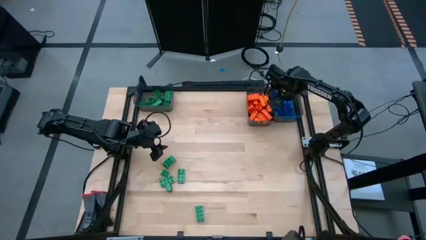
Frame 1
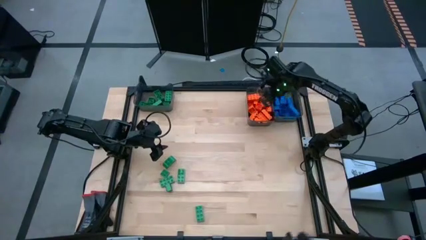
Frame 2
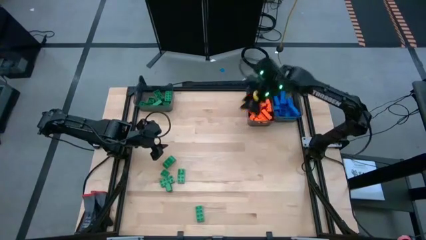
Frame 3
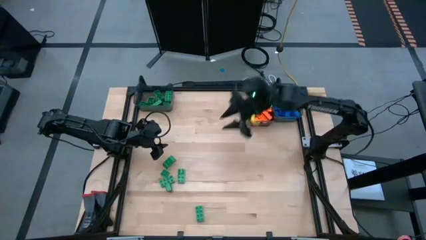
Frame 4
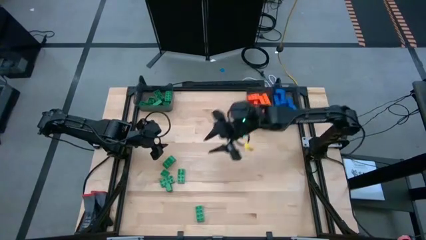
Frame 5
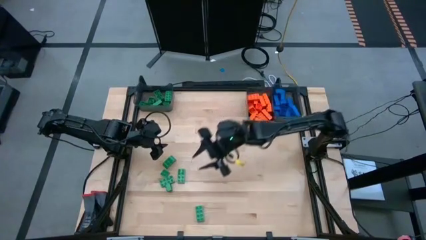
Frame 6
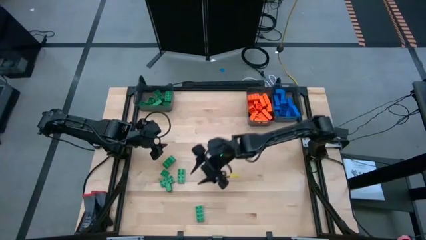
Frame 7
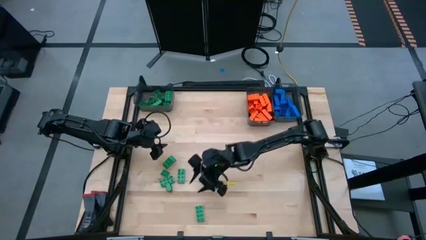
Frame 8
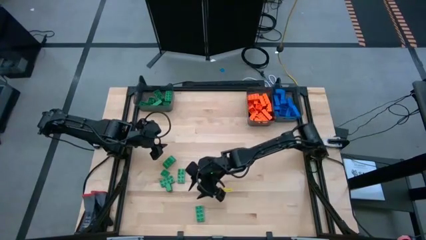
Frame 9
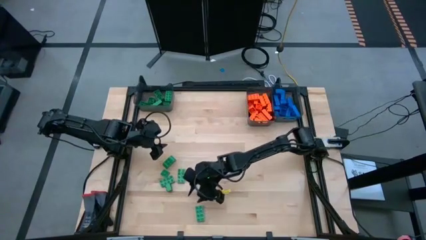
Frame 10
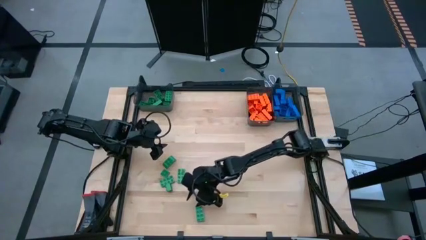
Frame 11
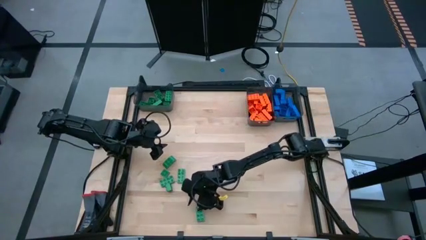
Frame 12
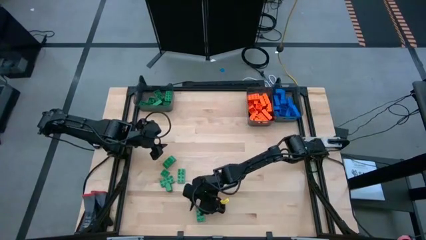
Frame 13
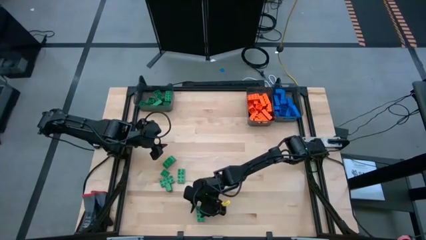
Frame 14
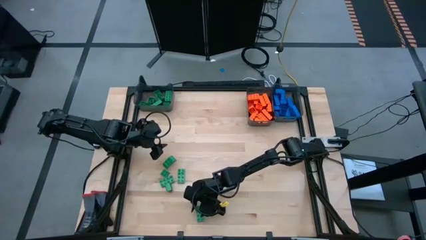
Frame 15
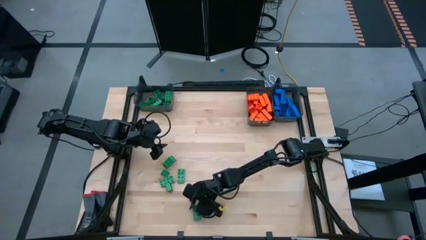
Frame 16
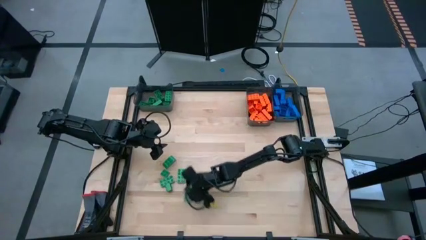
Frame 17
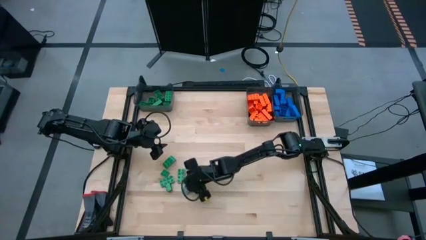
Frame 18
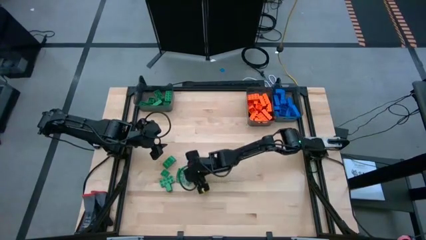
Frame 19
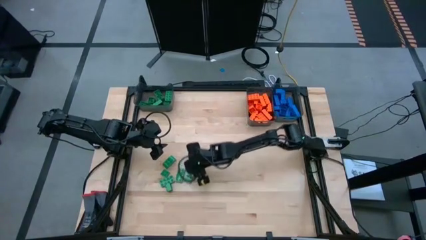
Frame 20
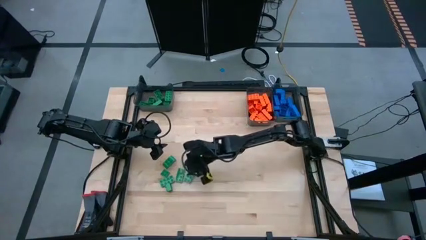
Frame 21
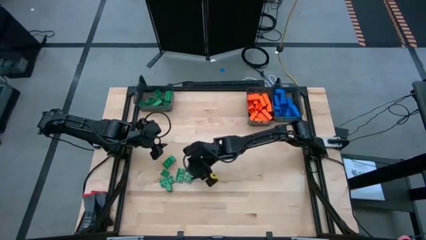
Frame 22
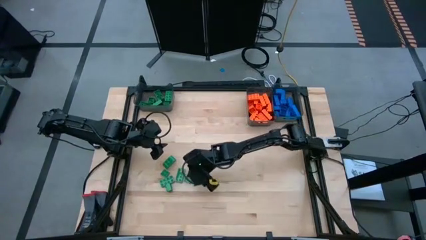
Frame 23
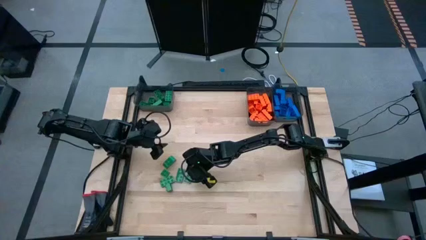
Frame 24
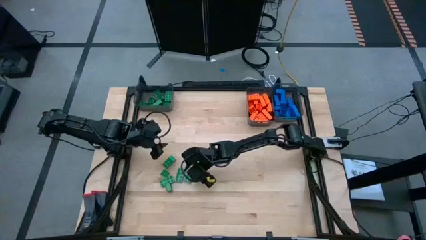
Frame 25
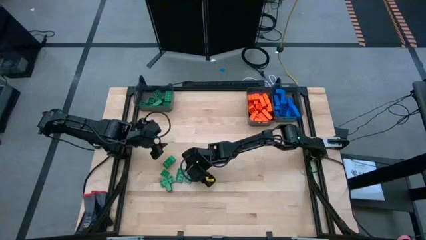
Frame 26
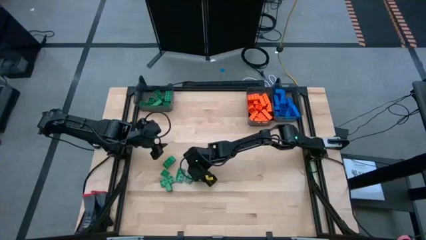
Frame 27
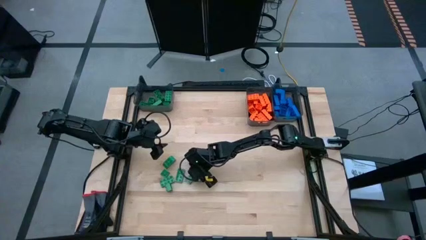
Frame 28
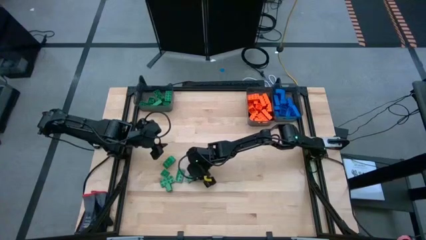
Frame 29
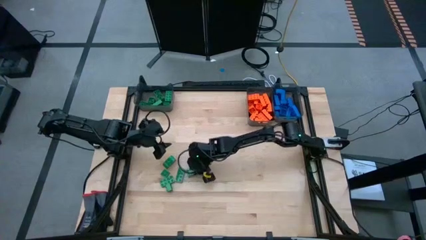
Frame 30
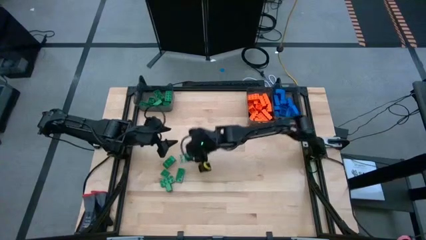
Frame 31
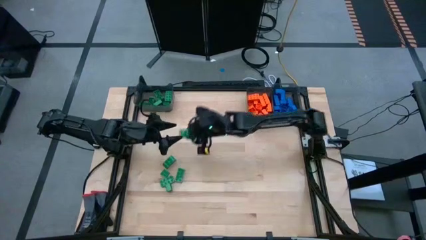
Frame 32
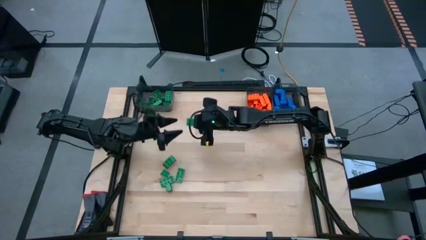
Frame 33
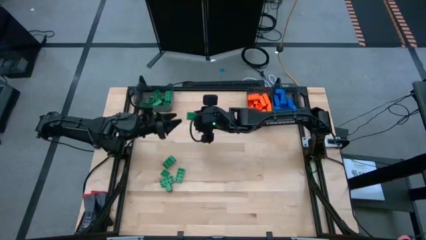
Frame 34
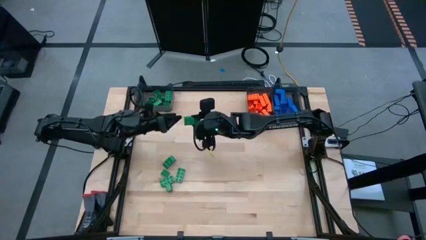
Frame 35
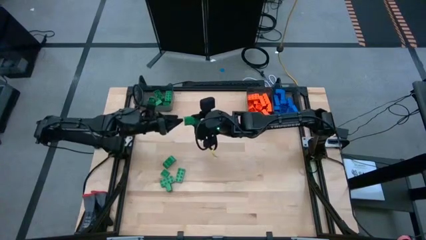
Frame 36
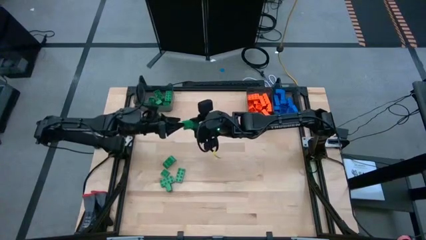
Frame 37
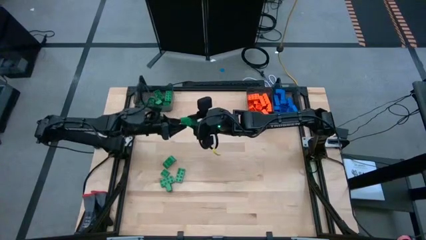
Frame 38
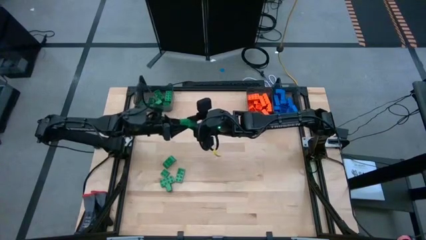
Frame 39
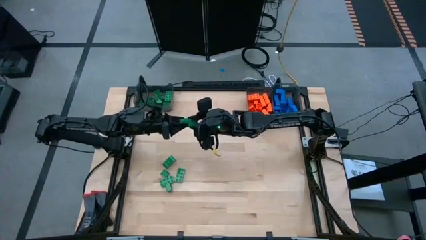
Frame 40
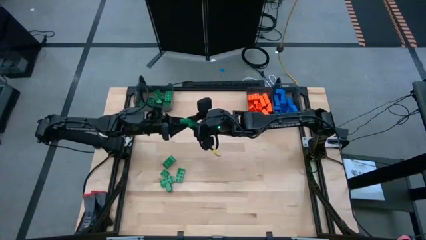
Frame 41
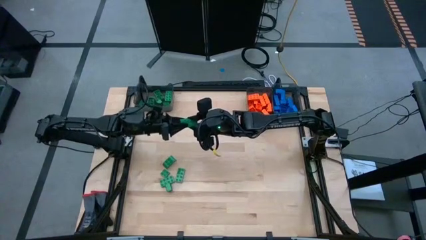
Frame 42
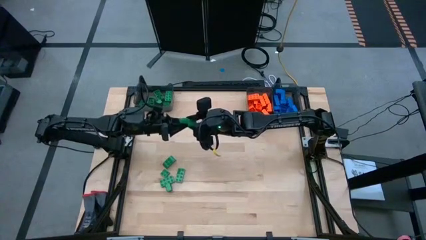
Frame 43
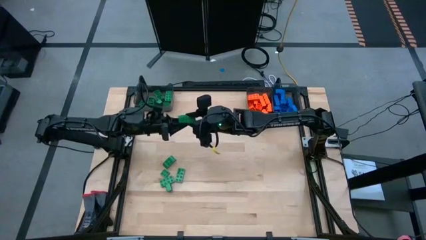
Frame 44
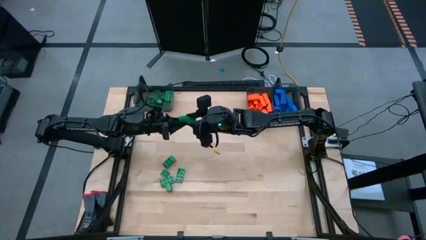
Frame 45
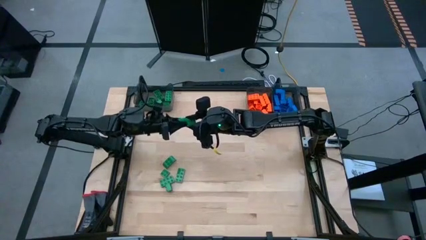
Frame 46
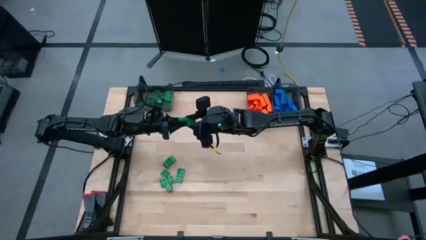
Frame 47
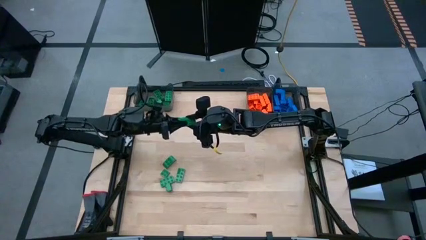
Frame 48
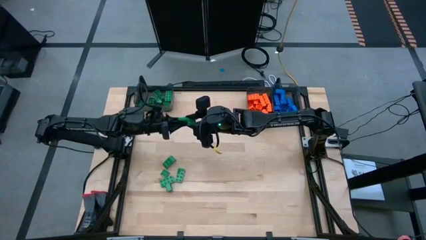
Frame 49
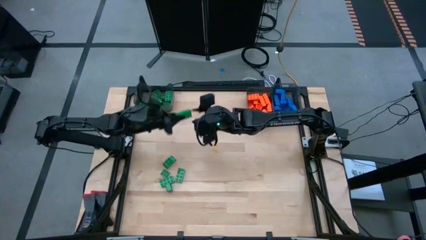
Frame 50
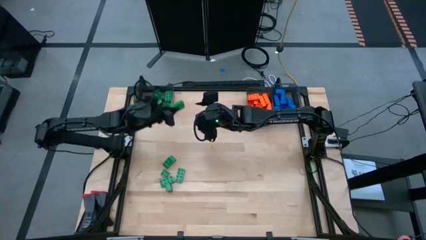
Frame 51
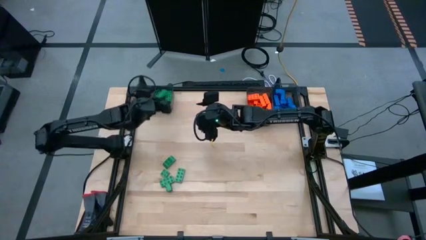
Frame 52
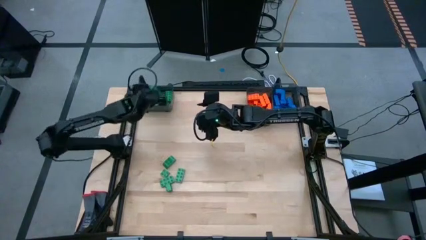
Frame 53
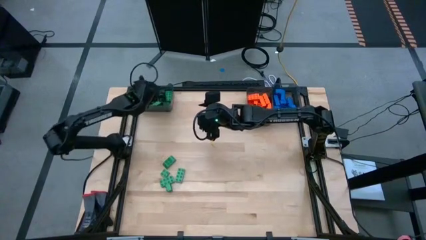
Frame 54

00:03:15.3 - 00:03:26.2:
Task: Sort blocks
Put the green game piece into the left black bin

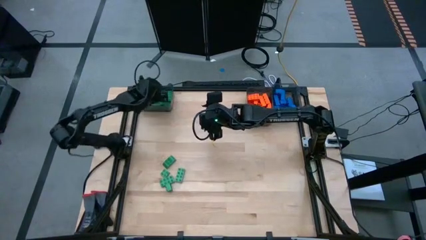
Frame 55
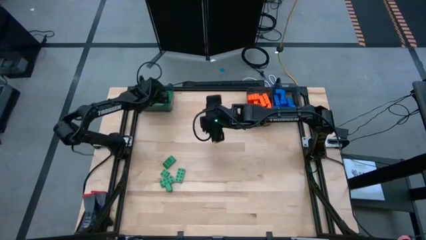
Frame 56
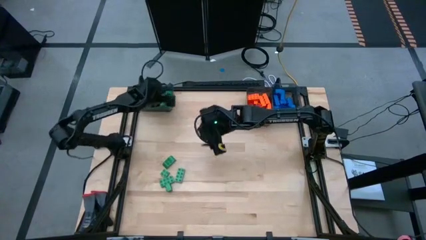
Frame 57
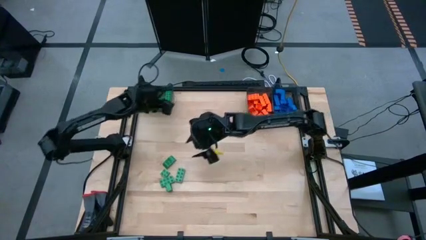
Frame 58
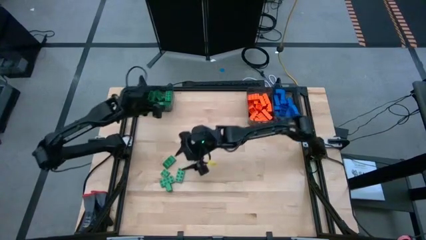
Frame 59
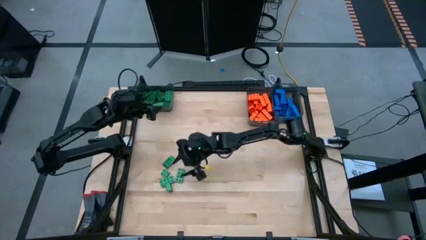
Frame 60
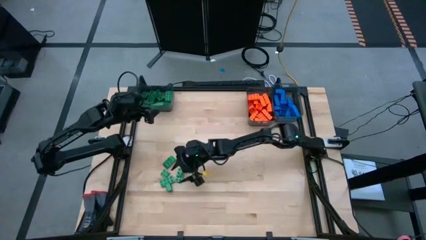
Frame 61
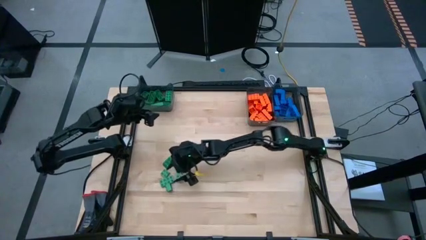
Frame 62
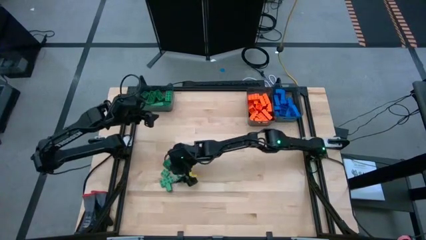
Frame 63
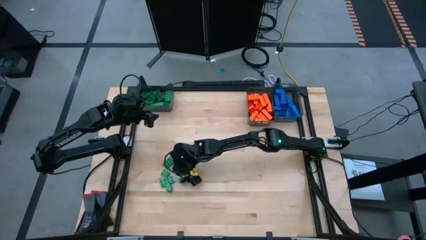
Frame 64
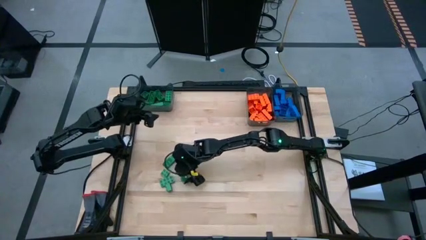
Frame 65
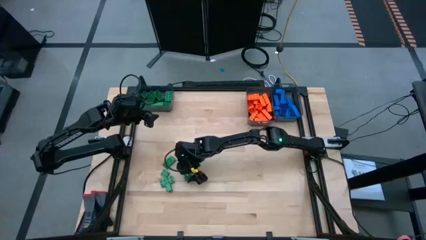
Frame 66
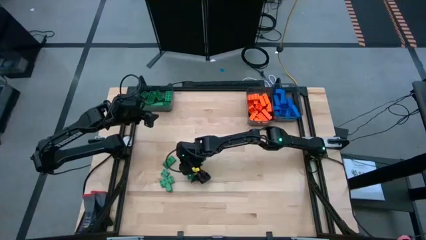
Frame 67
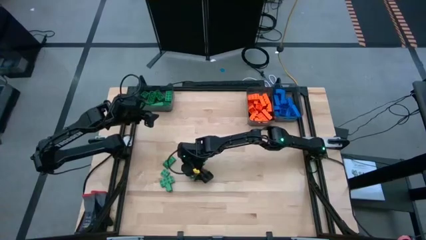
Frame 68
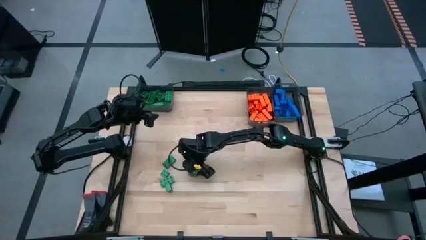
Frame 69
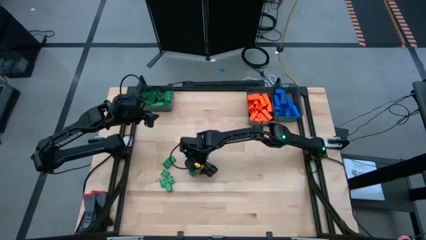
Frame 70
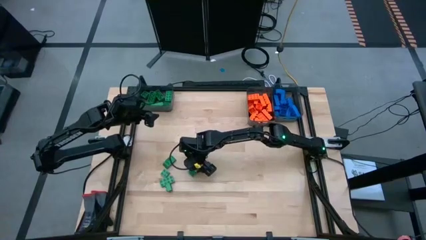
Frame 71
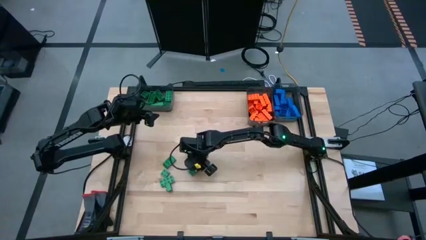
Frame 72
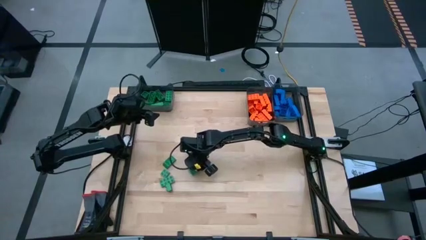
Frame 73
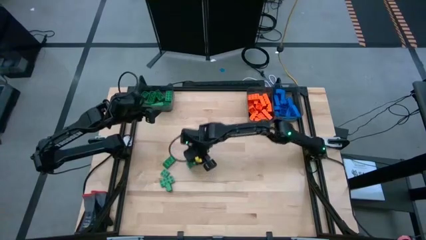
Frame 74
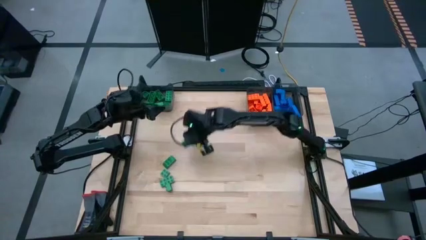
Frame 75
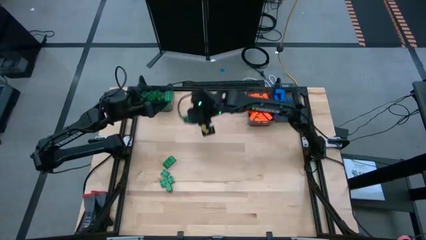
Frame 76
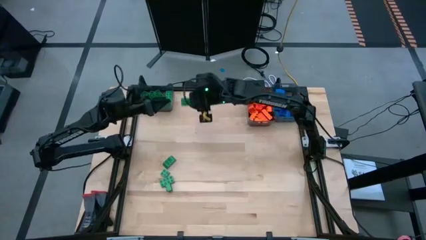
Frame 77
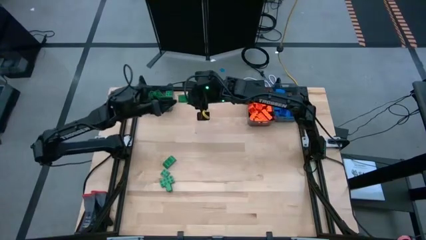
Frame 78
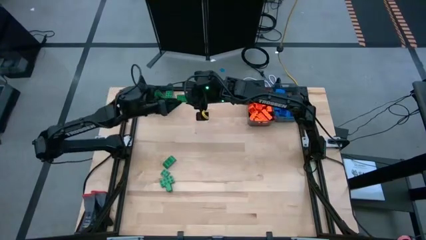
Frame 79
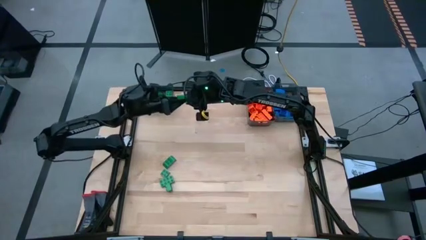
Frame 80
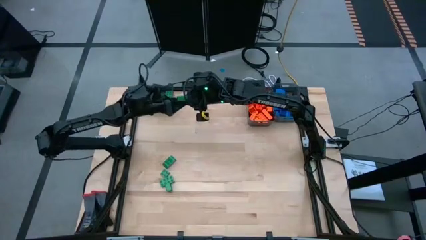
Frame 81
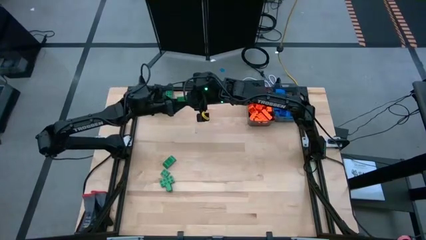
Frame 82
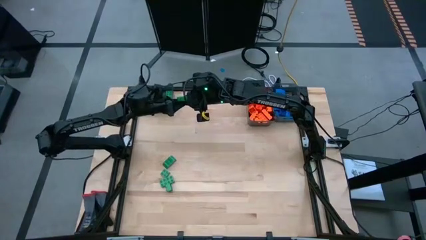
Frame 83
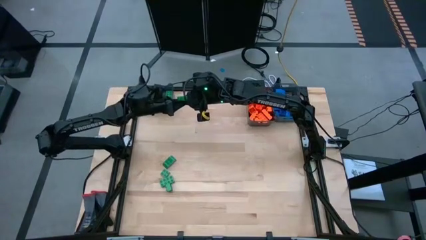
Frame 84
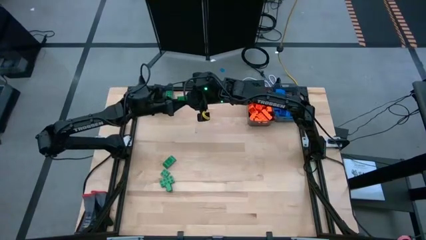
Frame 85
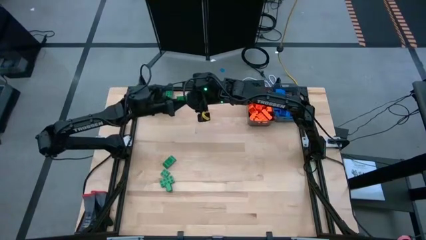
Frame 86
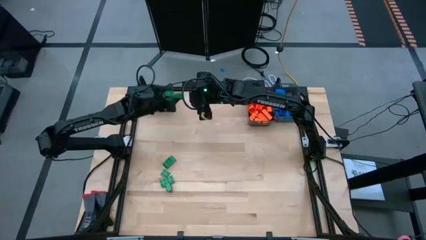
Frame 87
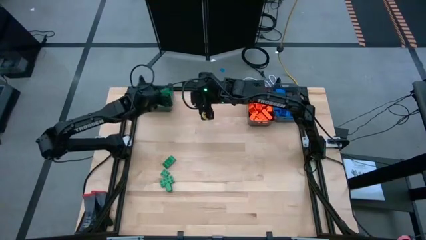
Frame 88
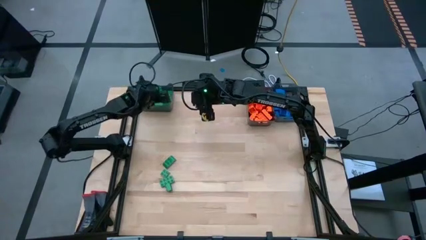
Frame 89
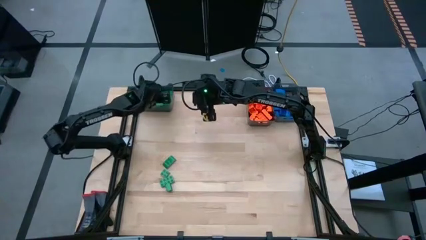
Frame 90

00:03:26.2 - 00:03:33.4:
Put the green game piece into the left black bin
